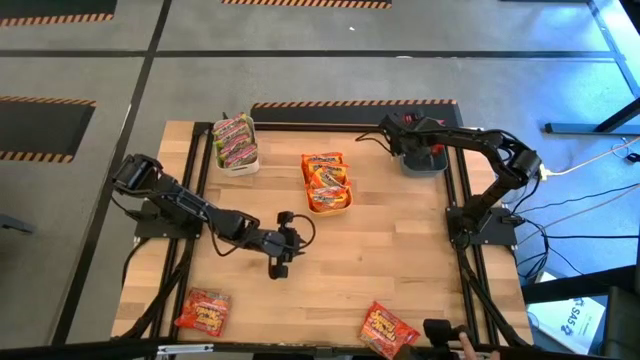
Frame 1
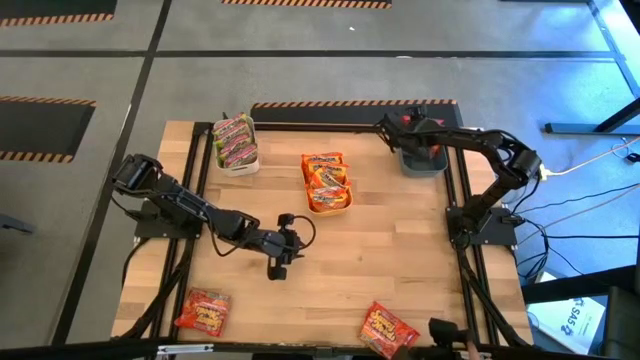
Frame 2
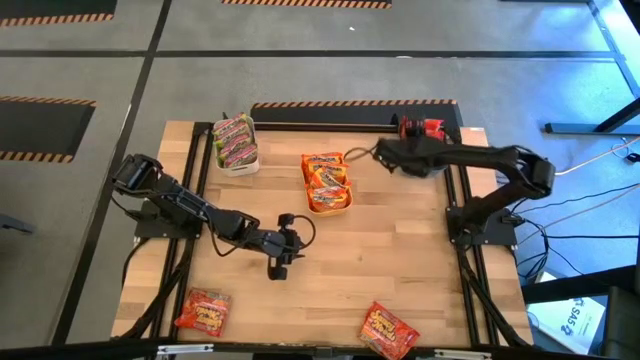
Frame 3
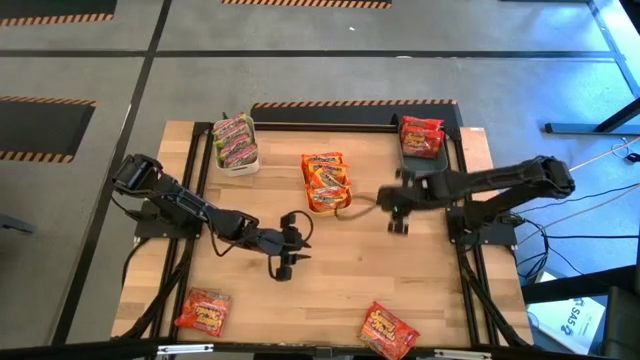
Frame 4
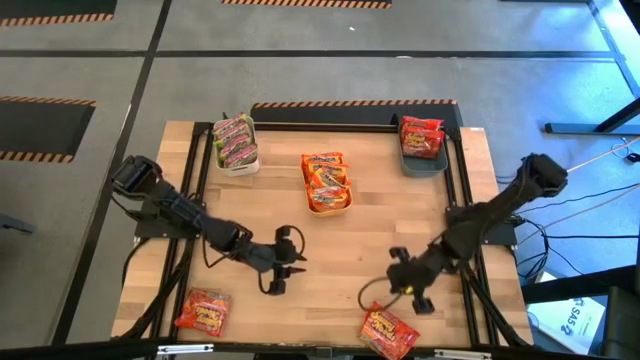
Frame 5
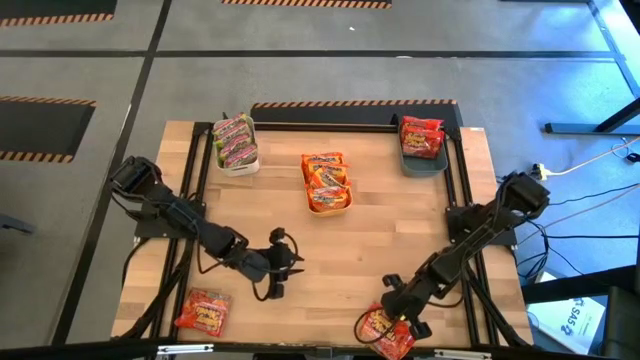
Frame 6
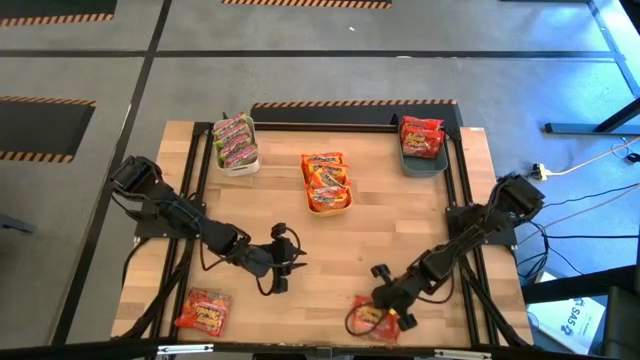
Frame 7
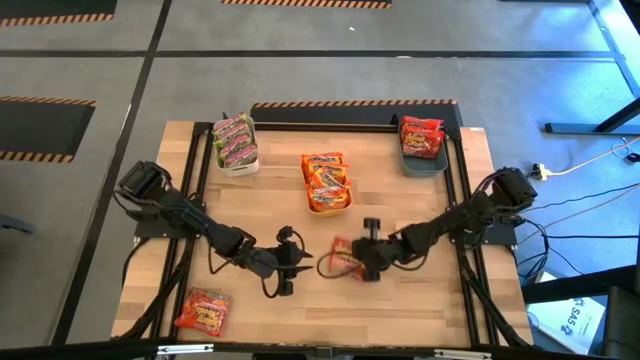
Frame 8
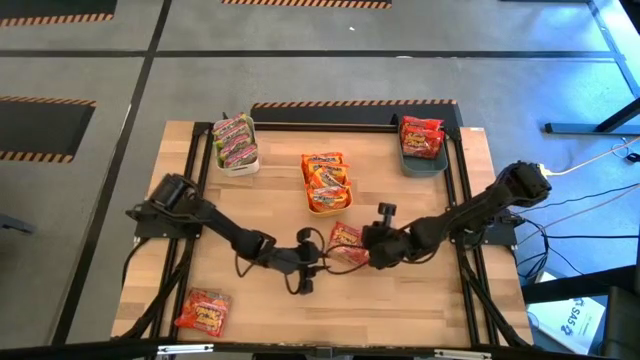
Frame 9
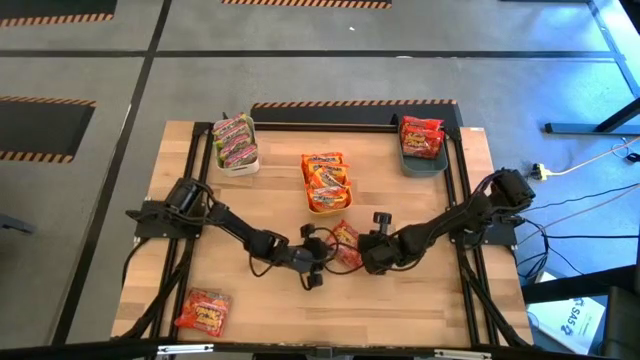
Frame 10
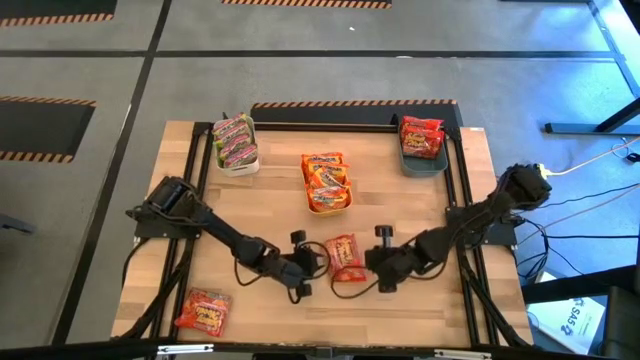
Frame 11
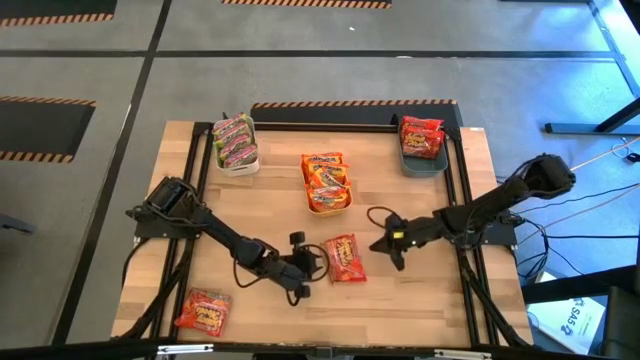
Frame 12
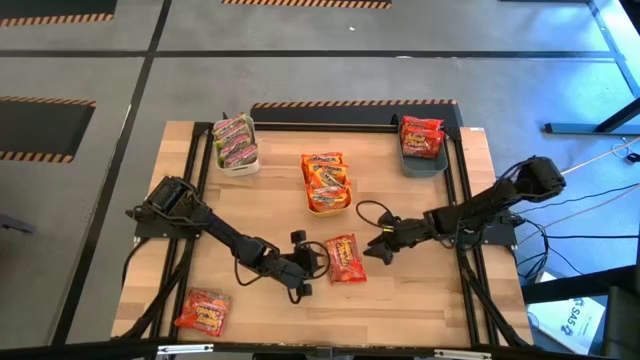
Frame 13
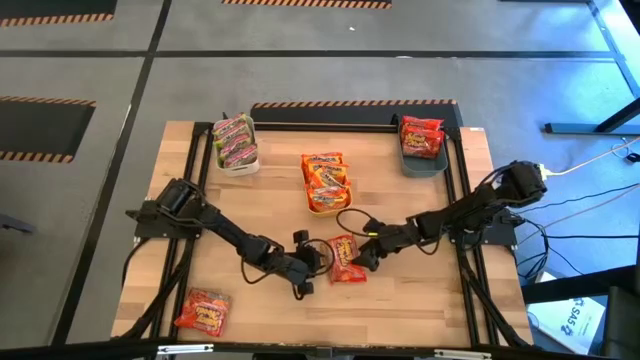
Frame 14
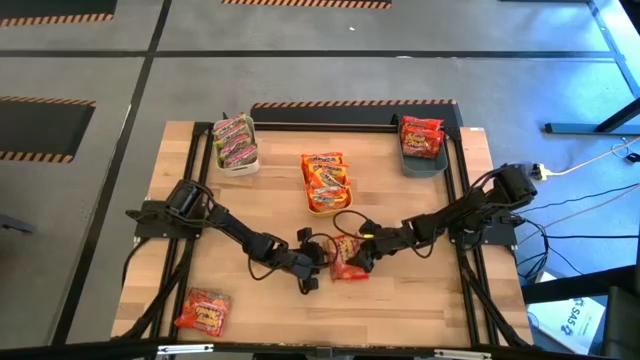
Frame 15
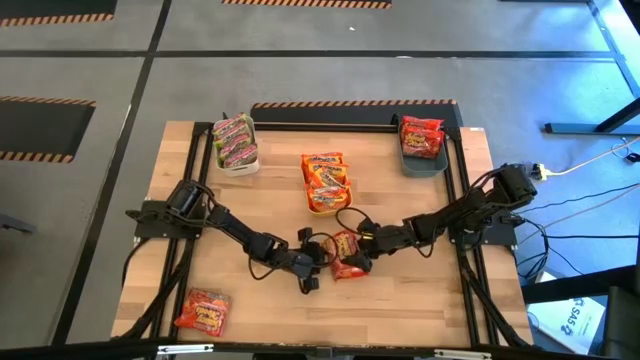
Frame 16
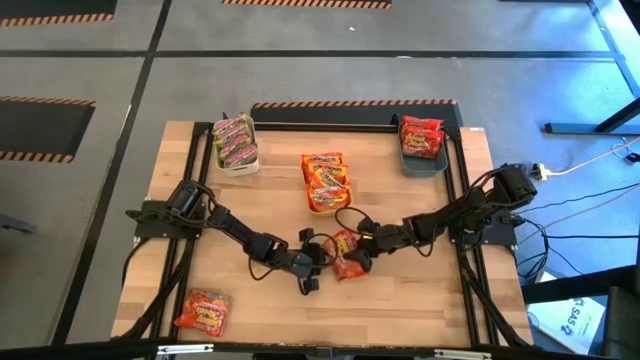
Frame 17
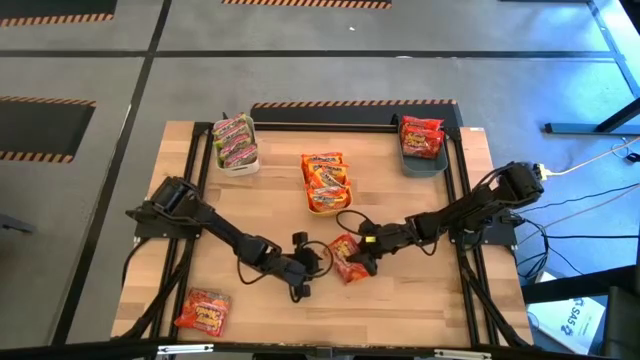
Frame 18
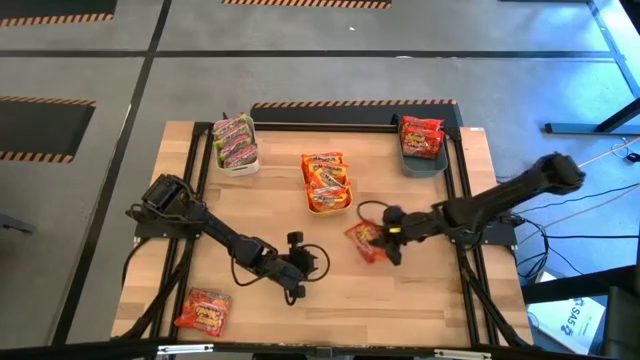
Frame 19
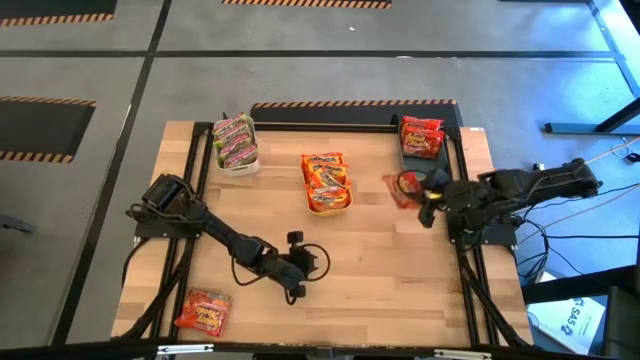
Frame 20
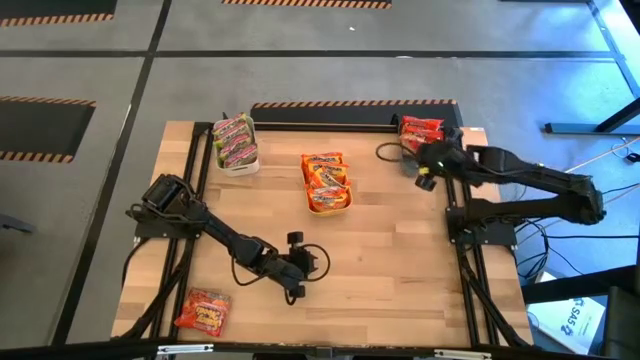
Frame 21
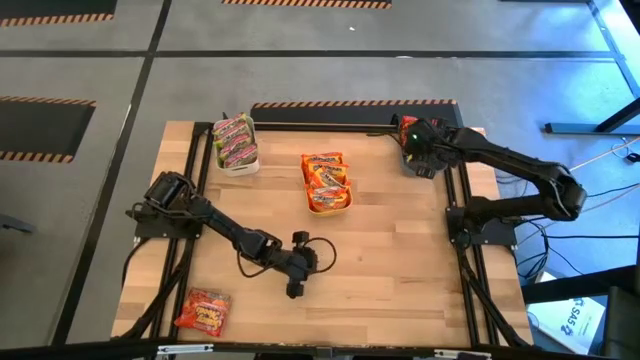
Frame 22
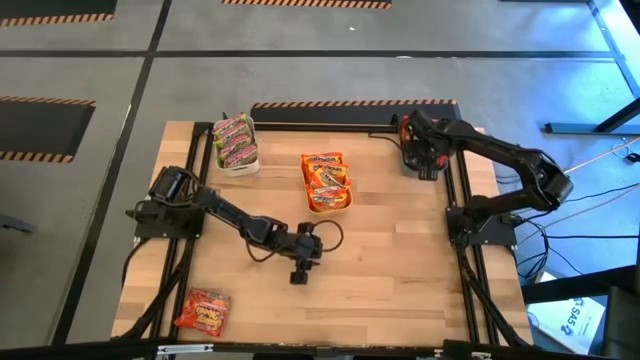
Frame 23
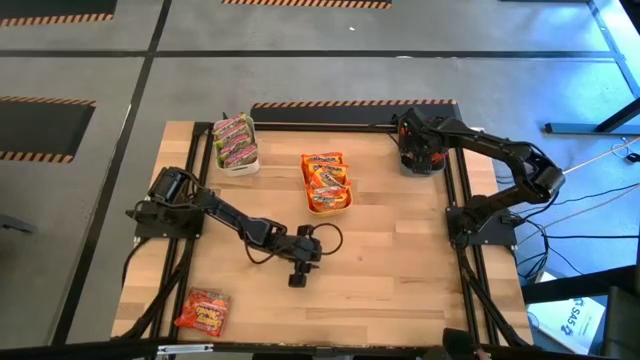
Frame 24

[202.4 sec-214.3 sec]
Task: Sort Maruchan noodles
Put the right red noodle pack into the green bin

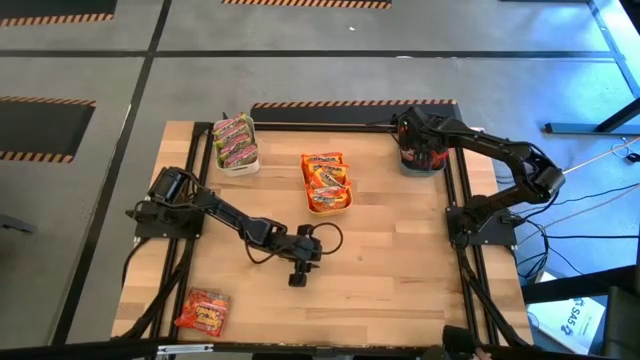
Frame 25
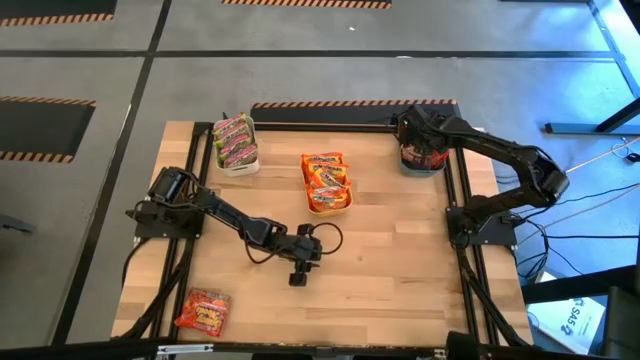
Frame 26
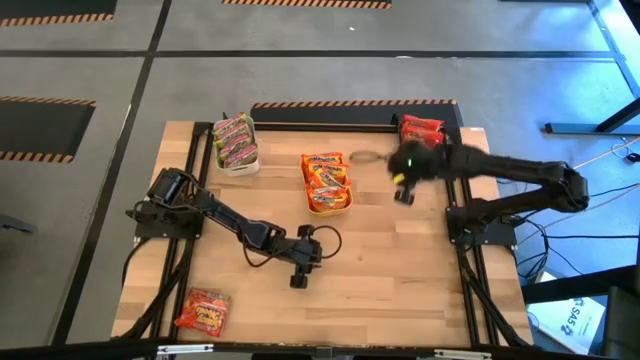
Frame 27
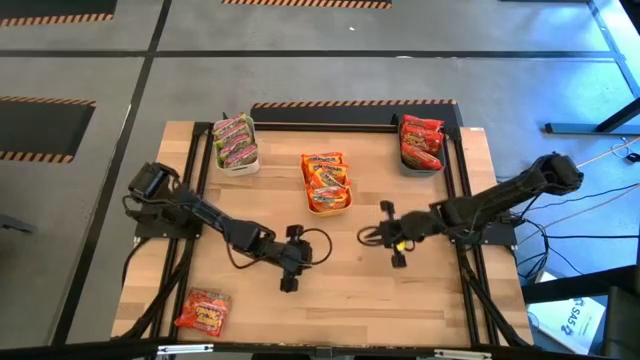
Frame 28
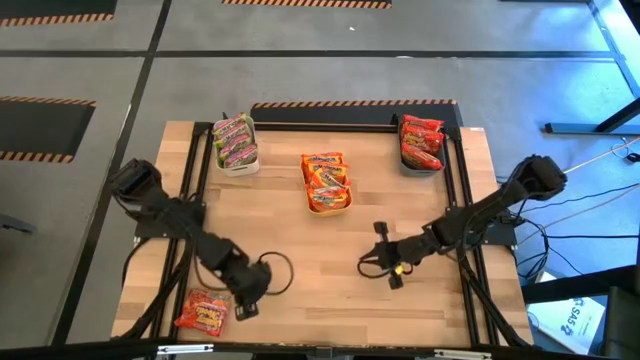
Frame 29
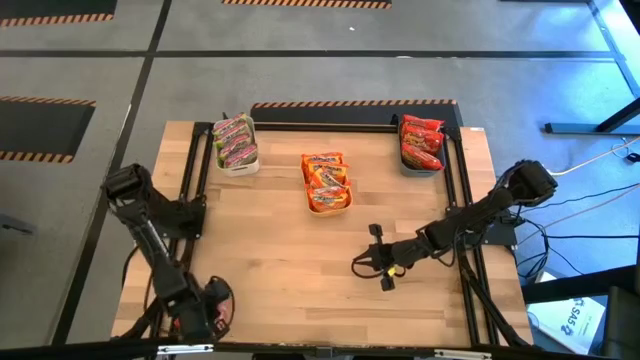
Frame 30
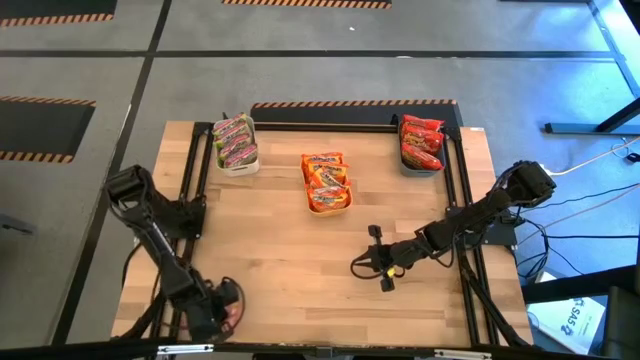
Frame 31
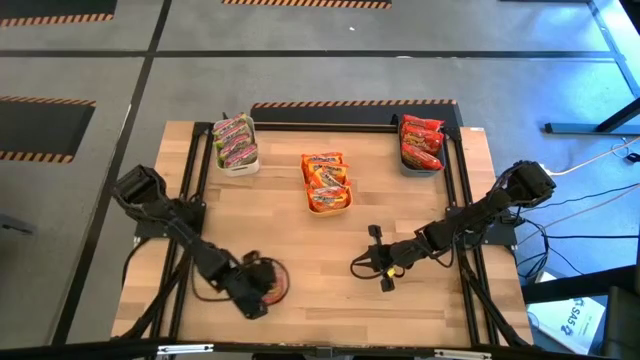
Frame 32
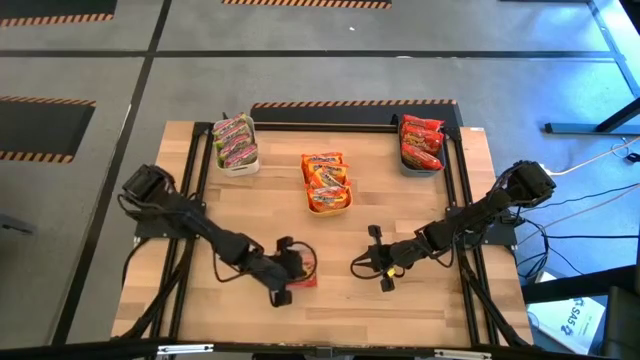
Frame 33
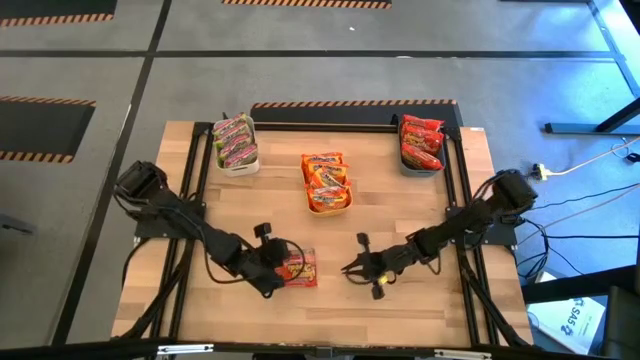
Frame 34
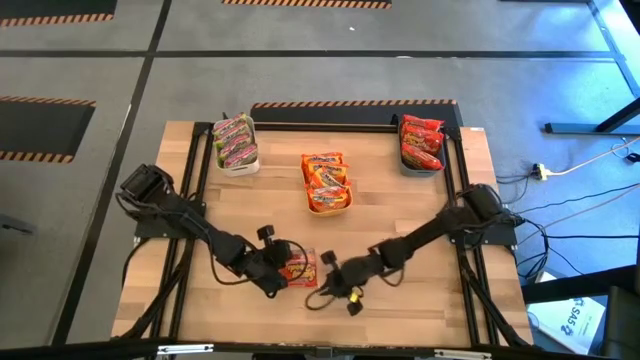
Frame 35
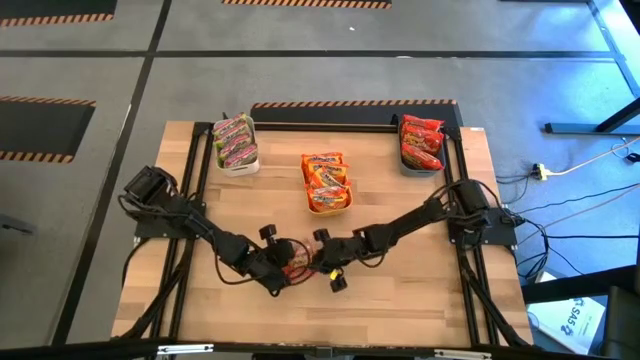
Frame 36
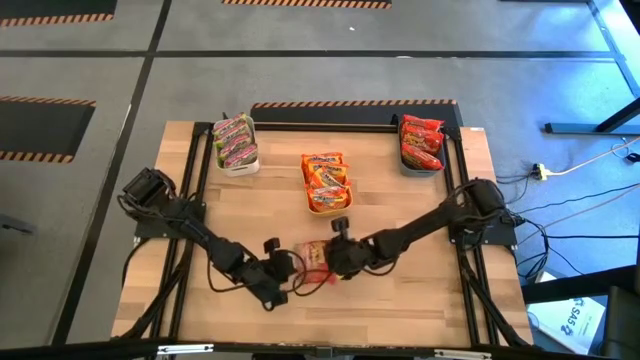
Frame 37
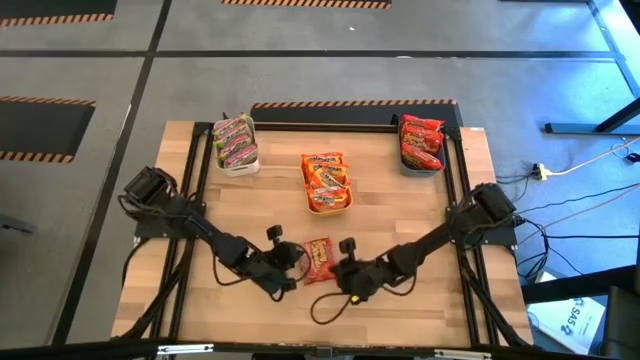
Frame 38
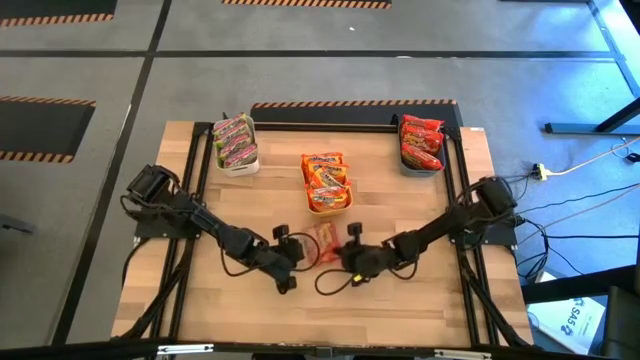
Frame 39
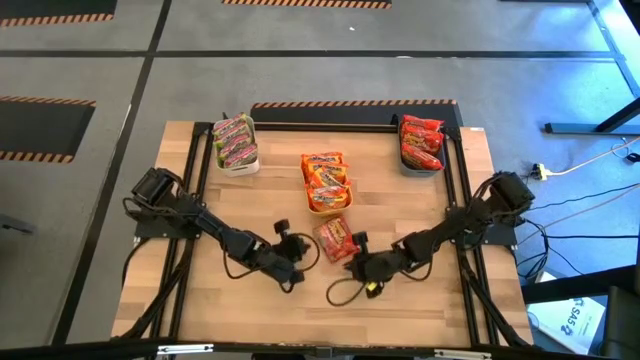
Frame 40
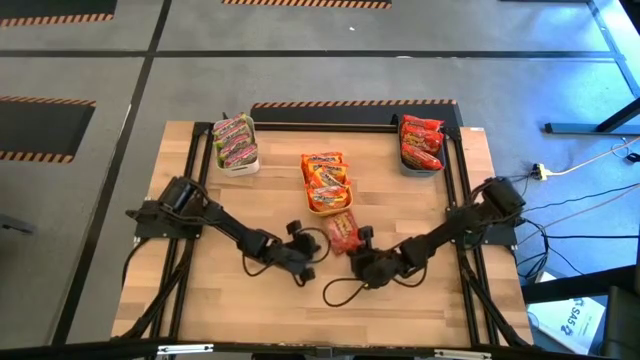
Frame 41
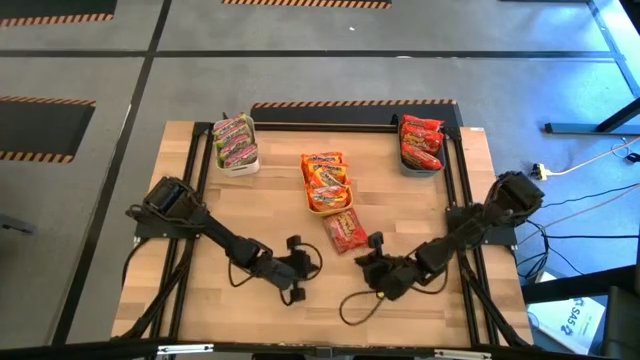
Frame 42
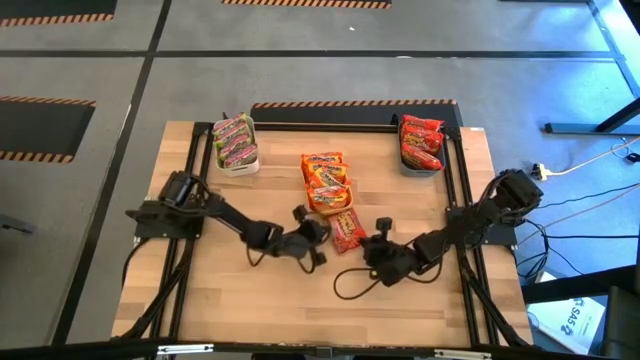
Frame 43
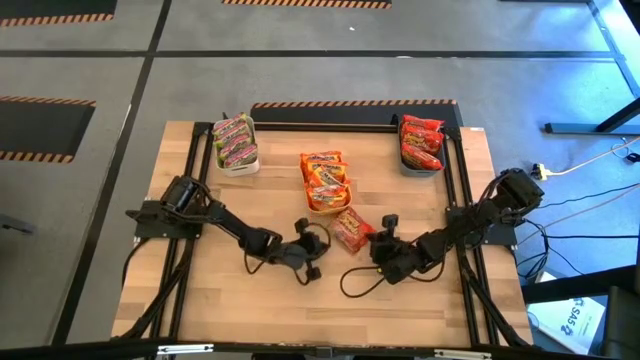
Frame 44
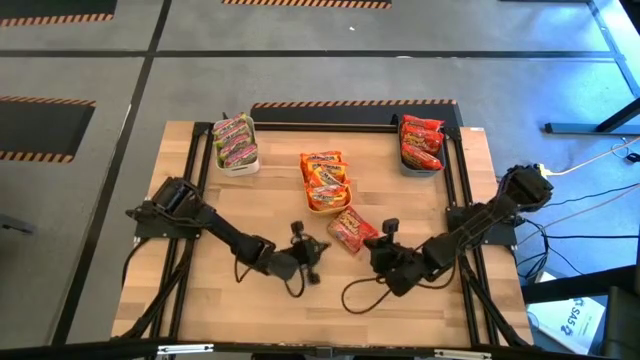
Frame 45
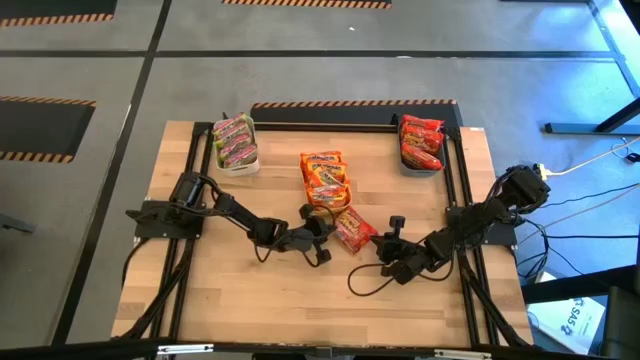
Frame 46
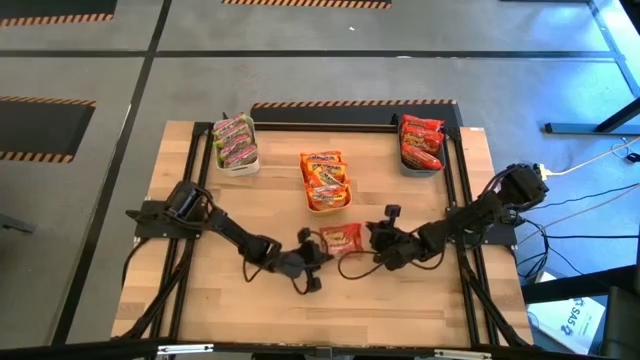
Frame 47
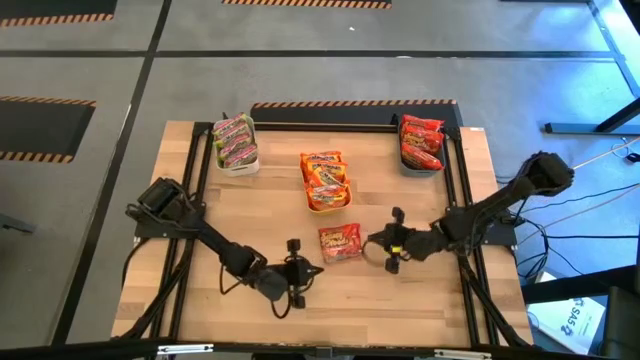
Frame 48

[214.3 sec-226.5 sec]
Put the red noodle pack into the green bin
